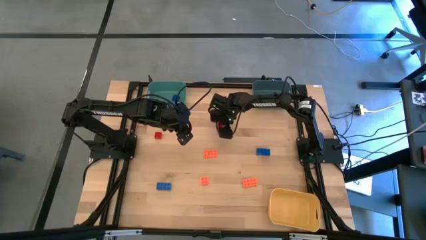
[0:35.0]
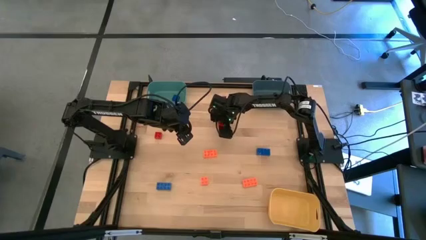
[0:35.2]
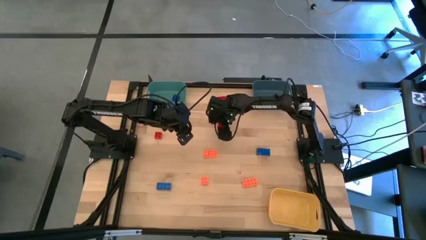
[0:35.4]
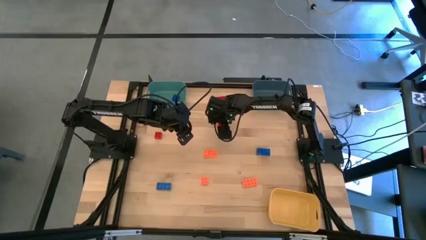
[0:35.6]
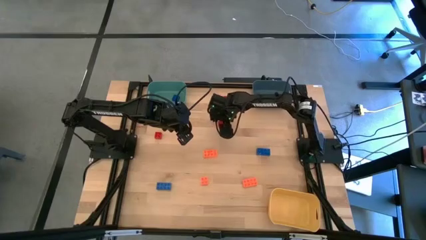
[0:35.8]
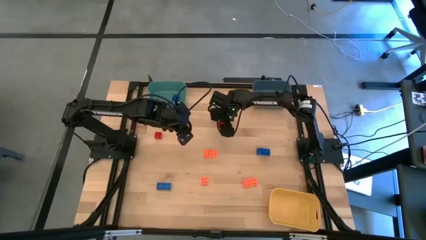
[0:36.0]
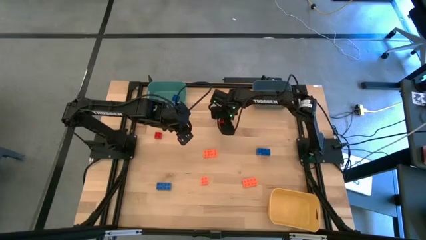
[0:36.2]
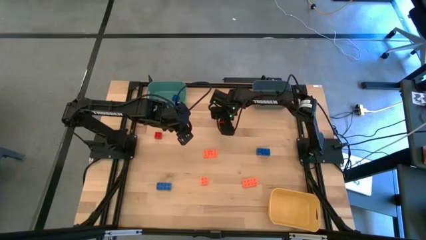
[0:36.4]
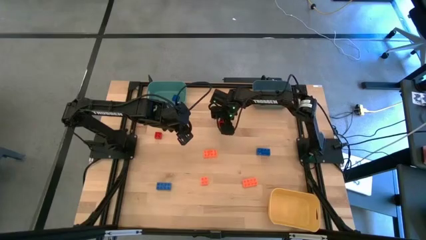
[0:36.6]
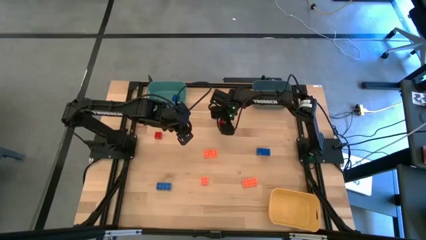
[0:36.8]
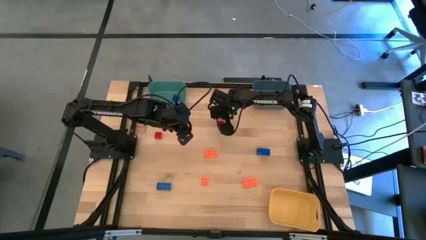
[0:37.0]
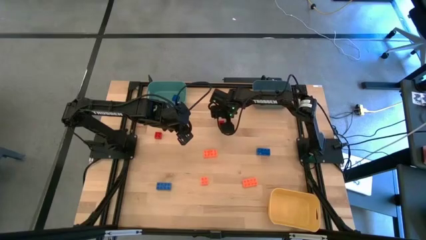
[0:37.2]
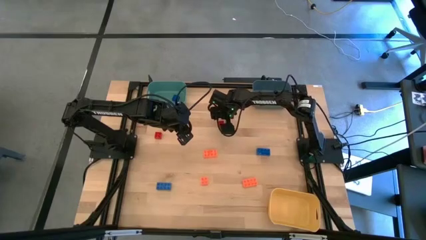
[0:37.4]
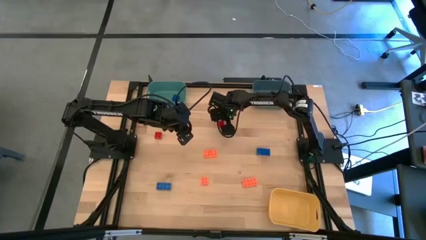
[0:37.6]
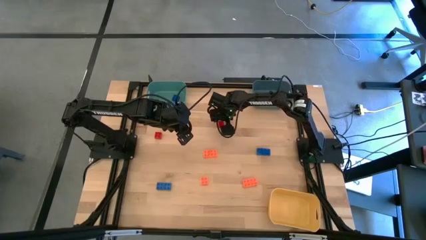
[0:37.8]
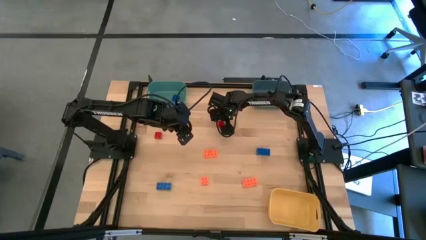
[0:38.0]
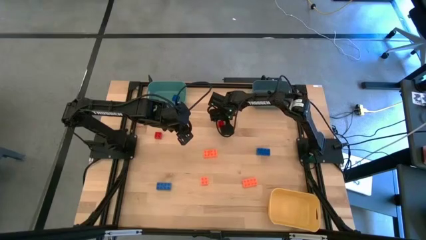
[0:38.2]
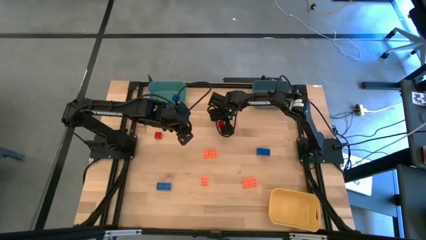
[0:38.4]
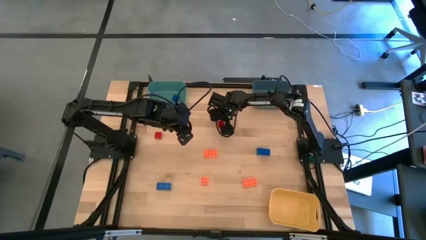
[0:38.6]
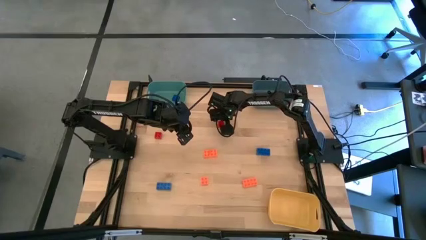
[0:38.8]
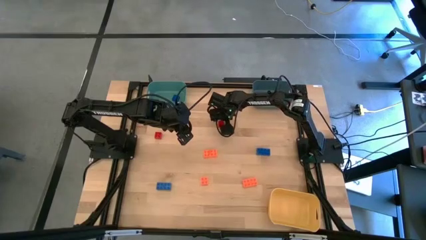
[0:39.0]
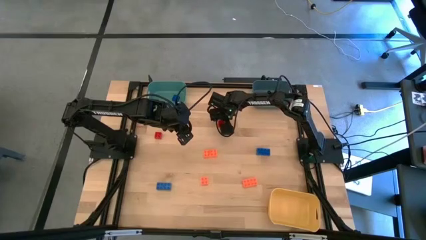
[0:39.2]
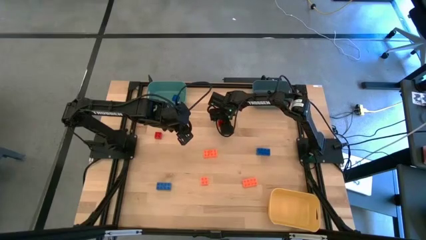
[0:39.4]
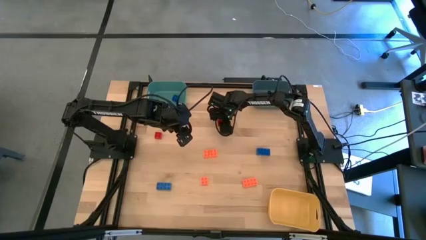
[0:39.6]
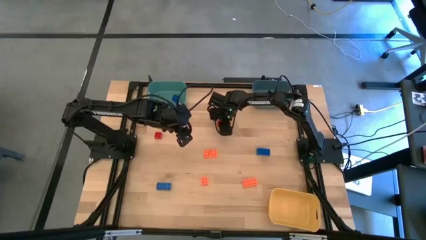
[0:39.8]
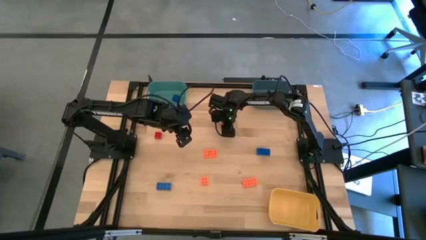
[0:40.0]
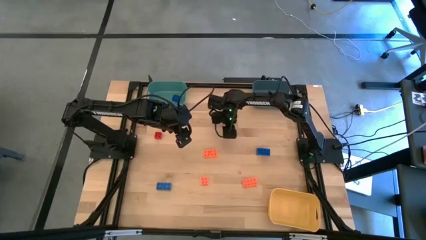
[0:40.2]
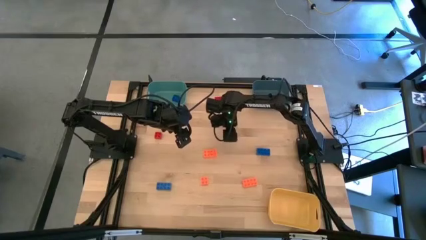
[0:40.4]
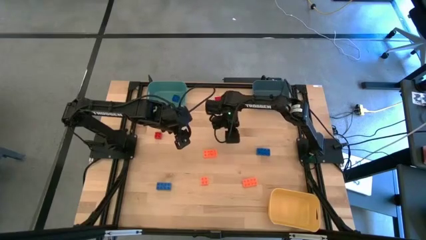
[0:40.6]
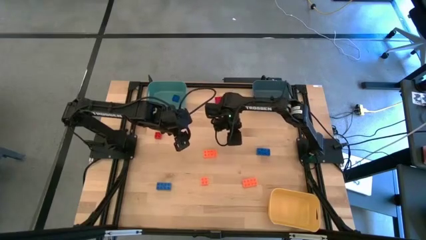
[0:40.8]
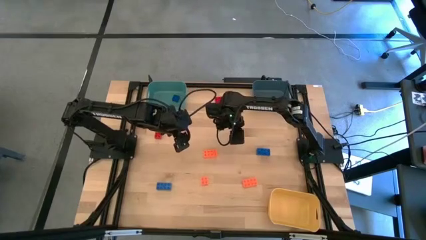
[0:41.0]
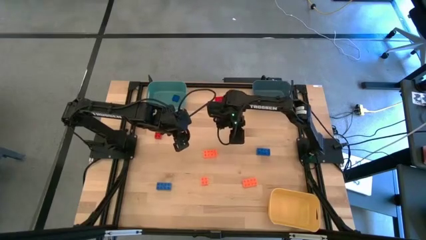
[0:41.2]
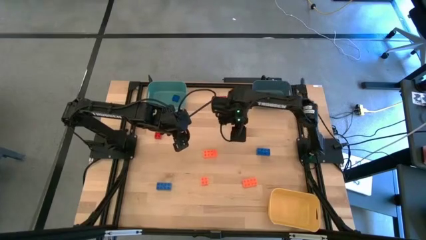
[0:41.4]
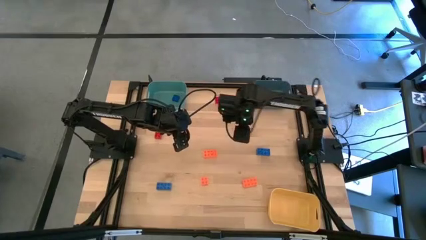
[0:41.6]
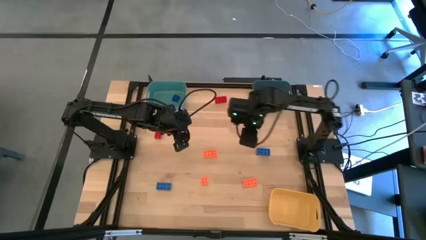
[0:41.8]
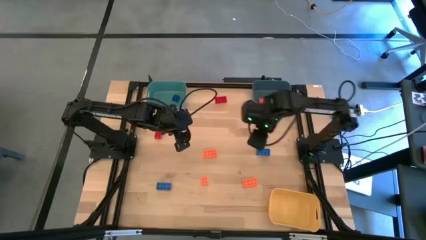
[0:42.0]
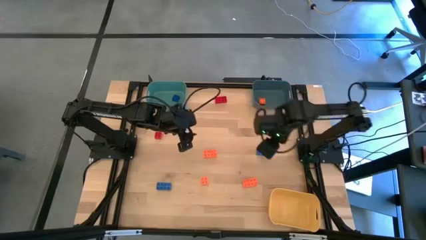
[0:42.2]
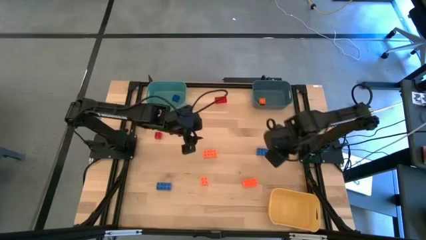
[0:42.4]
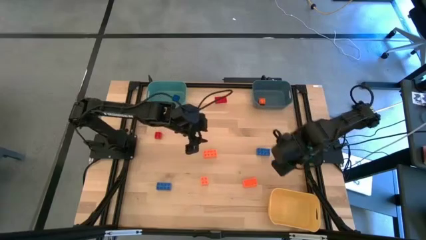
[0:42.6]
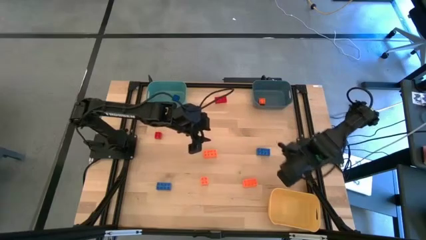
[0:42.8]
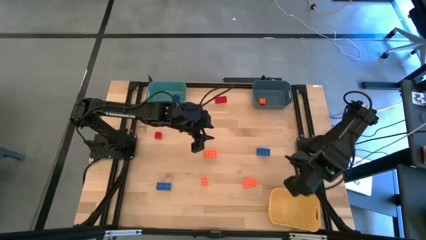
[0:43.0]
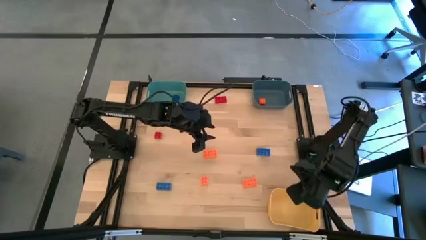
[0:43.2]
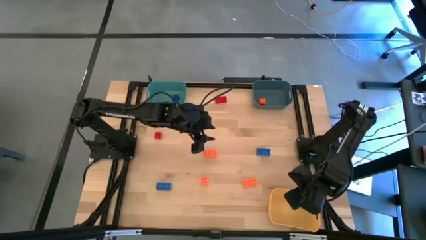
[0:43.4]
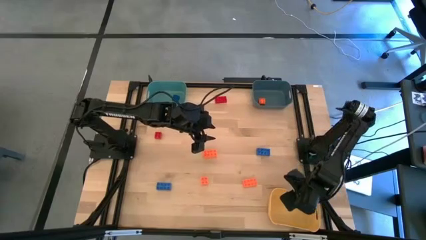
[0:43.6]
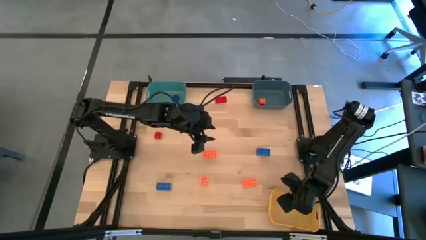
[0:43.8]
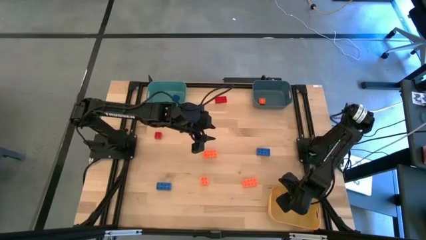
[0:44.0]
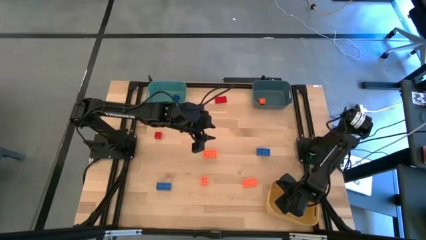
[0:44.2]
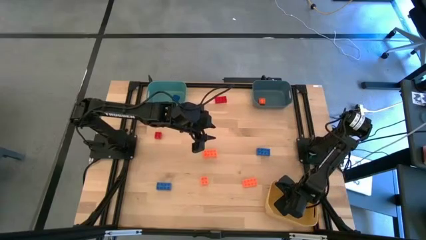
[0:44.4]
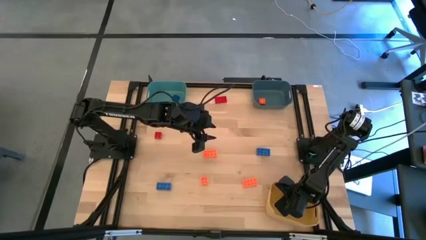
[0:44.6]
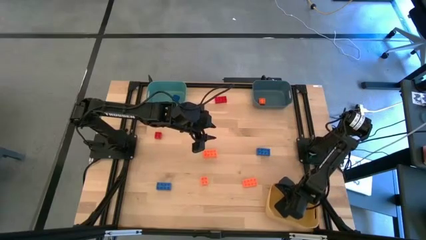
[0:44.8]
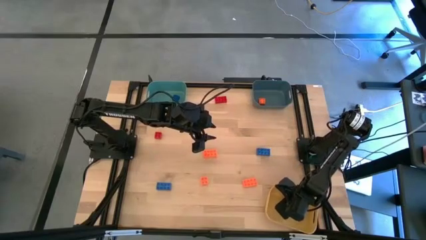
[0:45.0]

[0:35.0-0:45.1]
Task: Sort & place blocks by color
Put the red game piece into the yellow bin

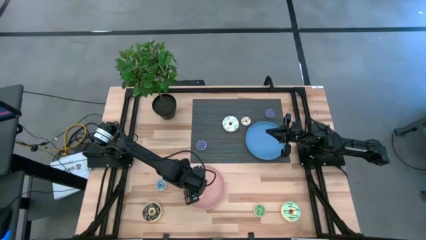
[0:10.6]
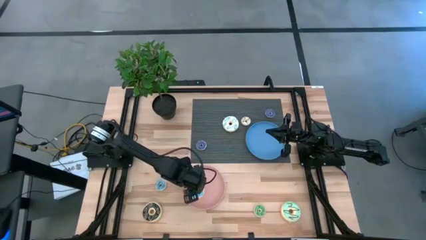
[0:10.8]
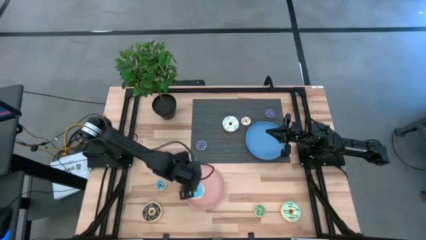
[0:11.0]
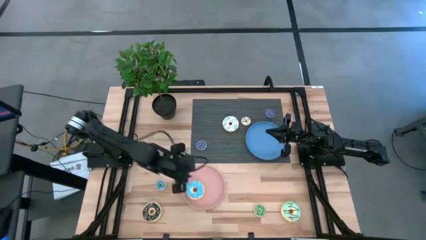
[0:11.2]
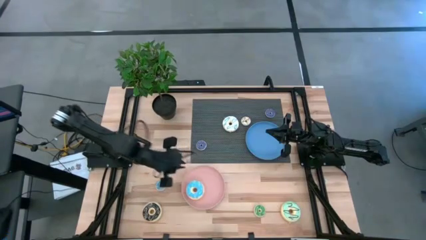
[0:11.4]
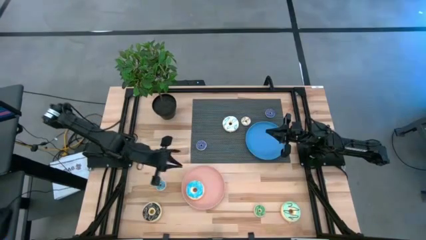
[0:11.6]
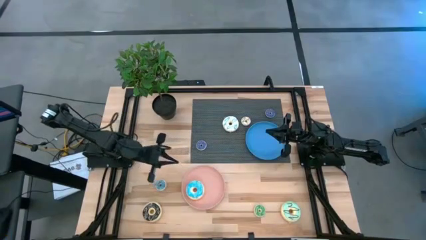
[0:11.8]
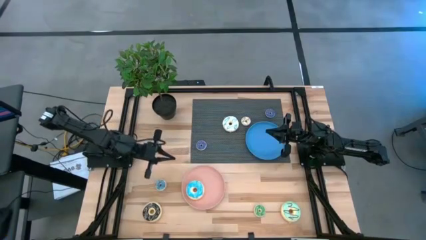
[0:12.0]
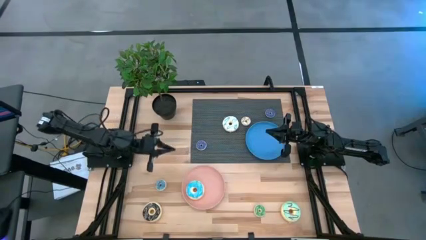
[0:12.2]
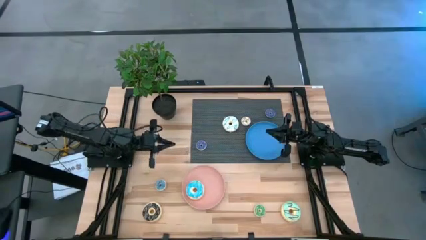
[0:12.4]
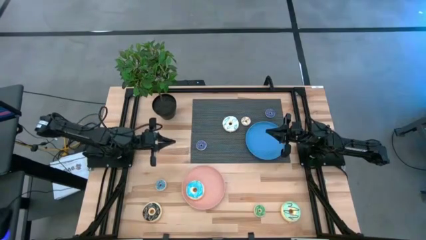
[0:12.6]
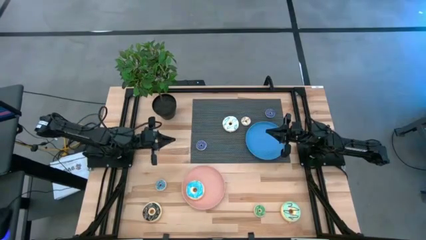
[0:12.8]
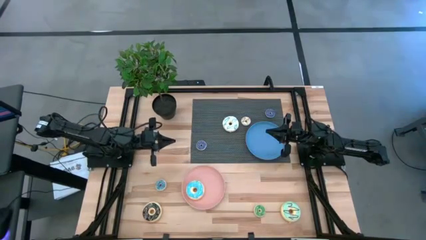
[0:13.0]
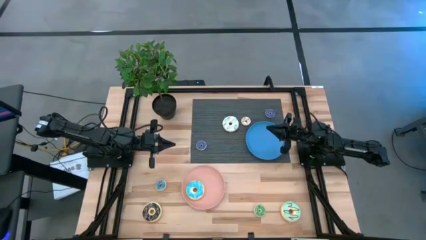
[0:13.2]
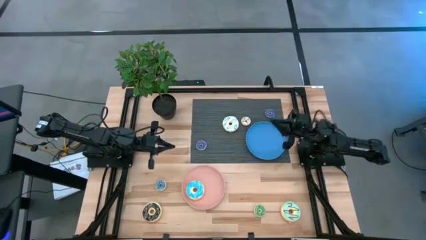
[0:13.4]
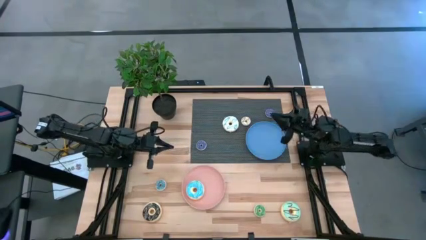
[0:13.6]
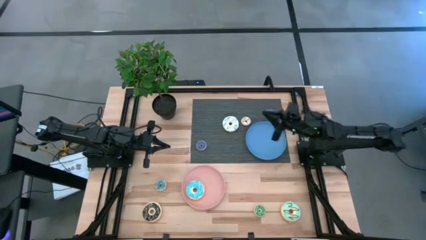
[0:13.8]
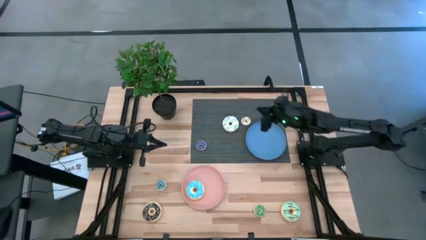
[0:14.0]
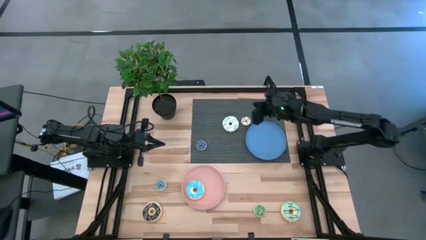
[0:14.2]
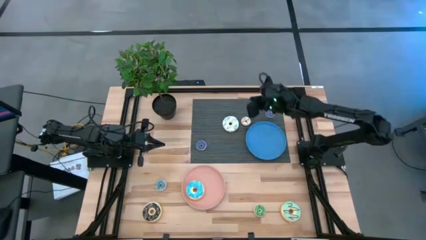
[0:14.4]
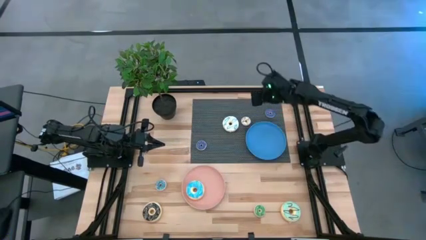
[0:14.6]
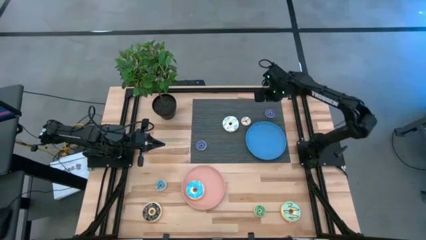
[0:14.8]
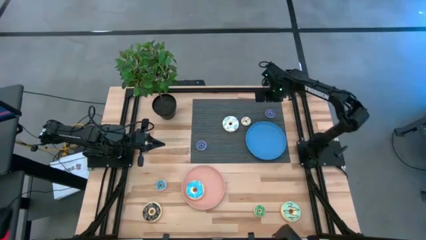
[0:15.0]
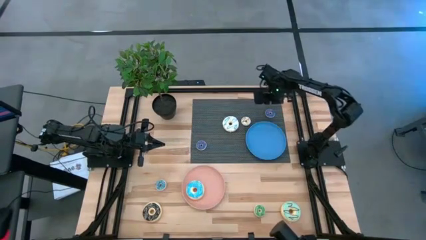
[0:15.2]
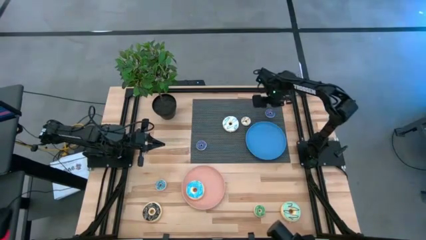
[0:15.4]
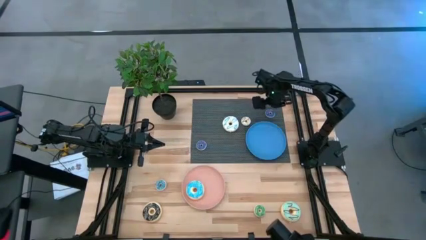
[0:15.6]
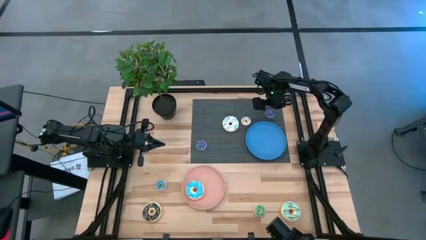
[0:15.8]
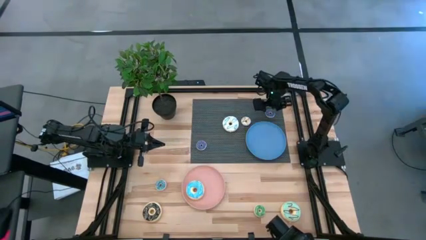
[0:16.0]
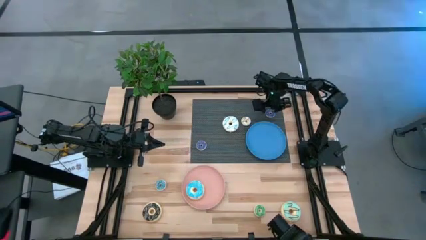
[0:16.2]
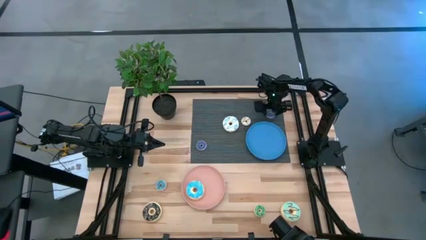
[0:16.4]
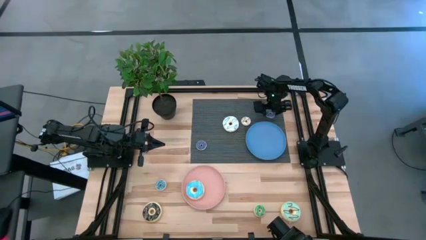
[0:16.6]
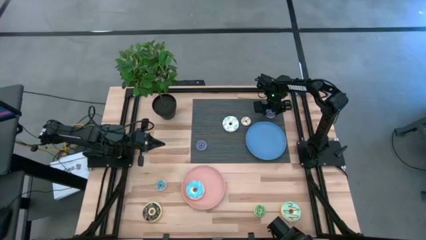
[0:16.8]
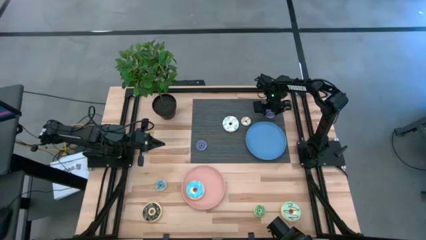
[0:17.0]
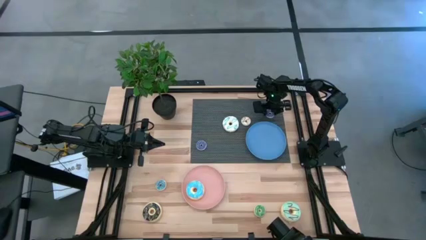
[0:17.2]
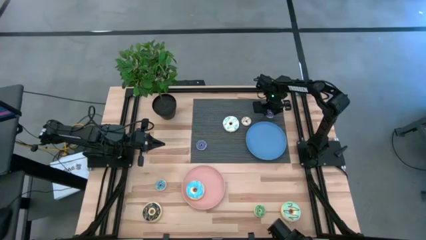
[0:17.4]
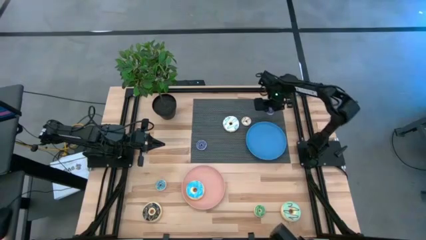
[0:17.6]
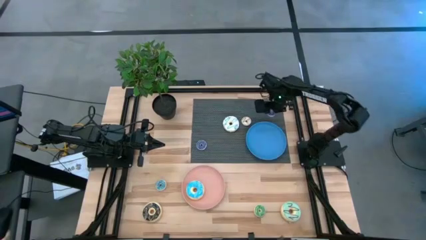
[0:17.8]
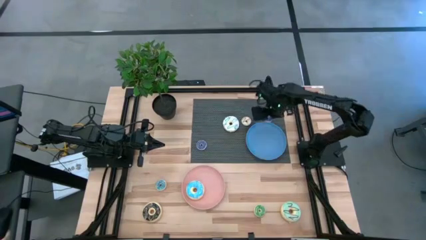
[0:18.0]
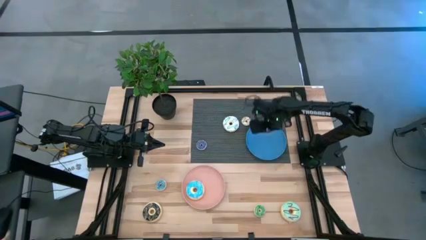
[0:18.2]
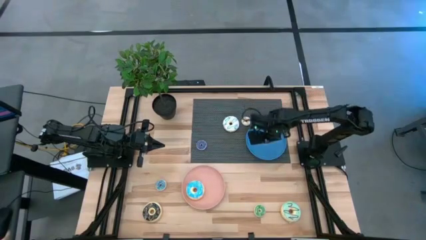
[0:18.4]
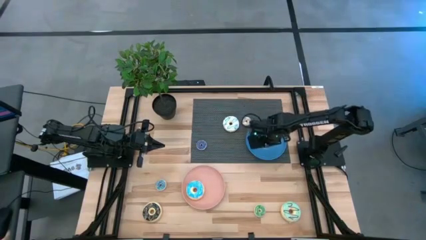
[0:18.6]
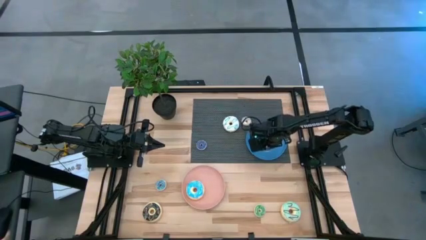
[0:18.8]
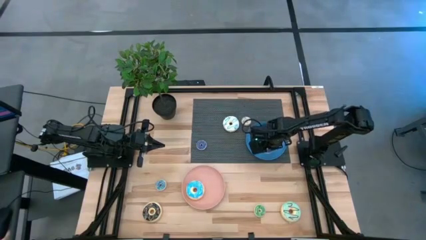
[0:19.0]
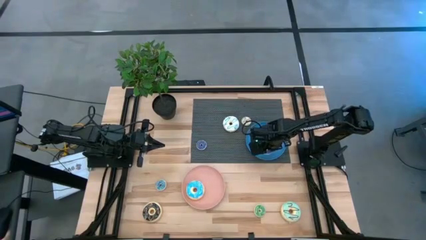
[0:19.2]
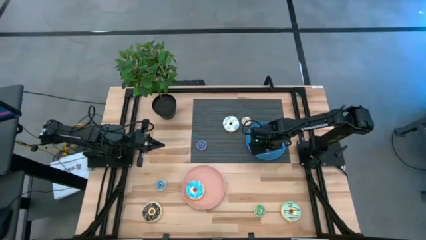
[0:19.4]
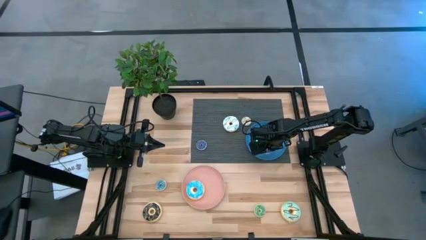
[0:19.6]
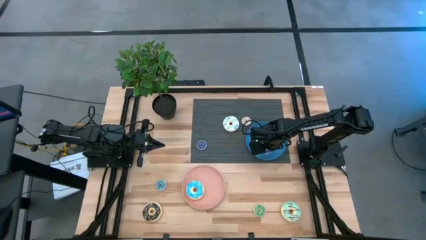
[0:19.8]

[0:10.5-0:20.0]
Task: Pick & Place donuts
Put the small dark blue donut onto the blue plate
